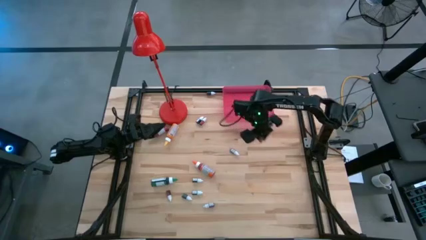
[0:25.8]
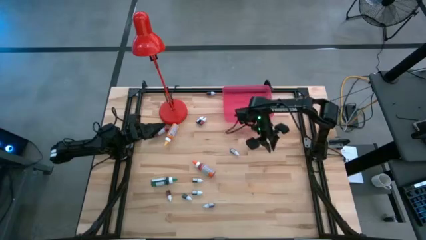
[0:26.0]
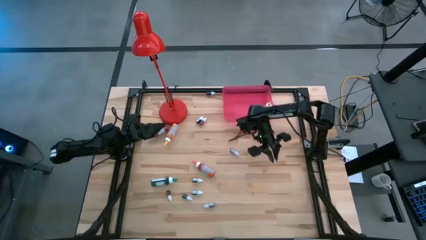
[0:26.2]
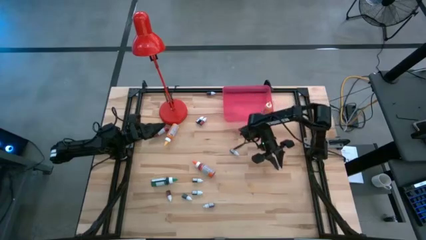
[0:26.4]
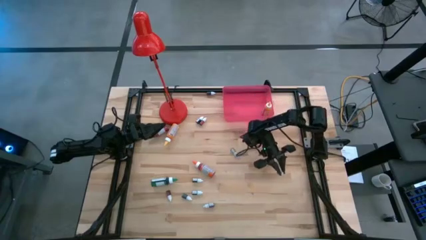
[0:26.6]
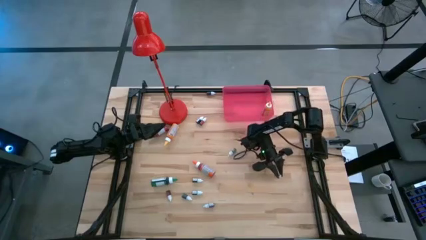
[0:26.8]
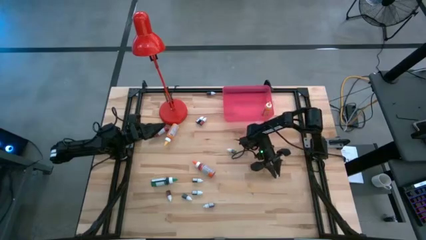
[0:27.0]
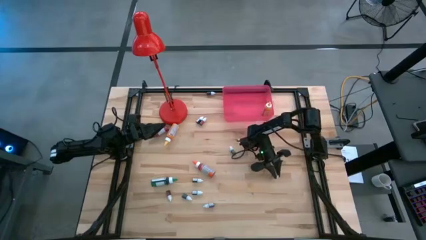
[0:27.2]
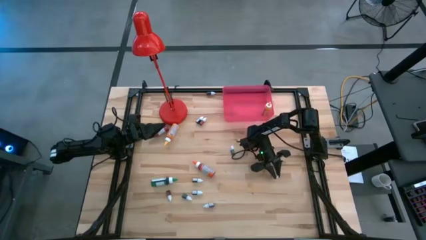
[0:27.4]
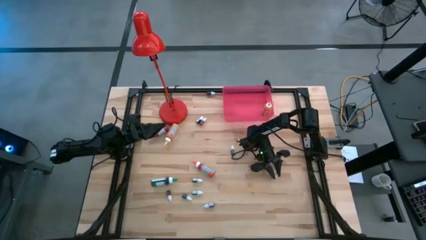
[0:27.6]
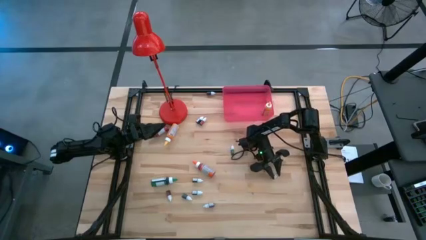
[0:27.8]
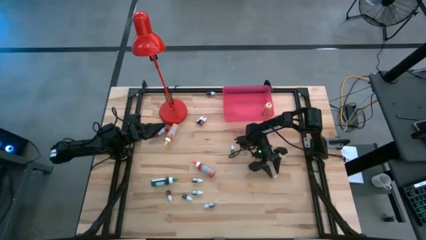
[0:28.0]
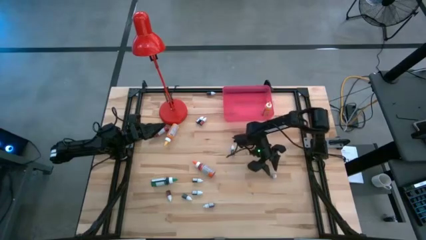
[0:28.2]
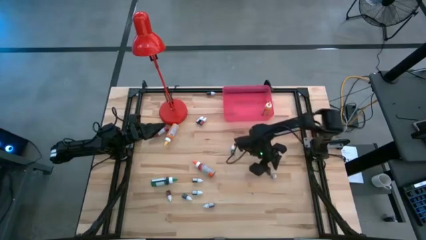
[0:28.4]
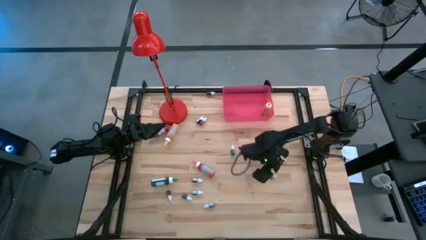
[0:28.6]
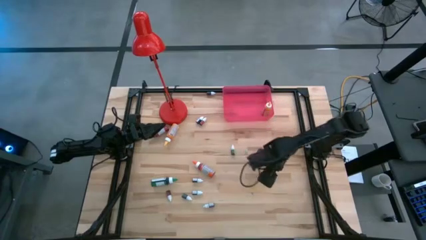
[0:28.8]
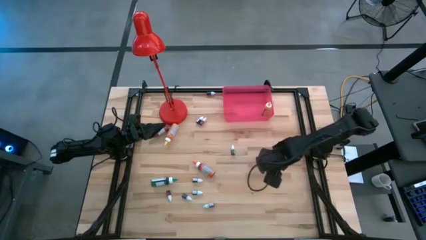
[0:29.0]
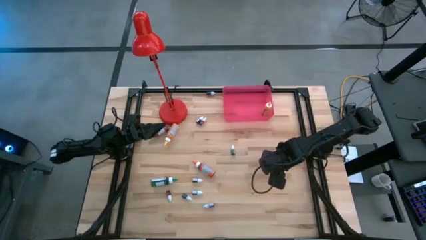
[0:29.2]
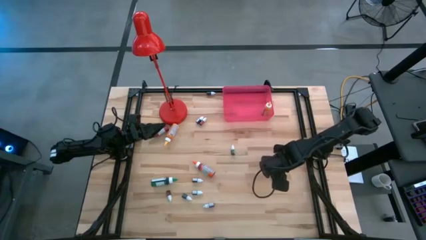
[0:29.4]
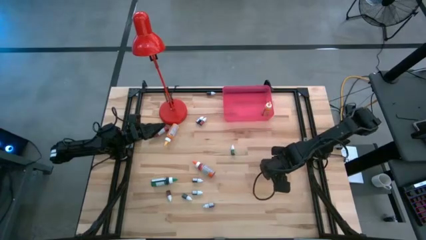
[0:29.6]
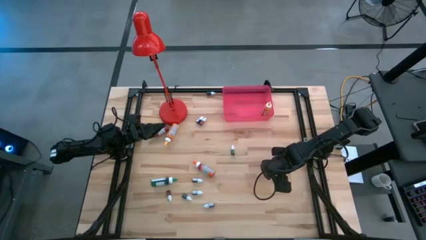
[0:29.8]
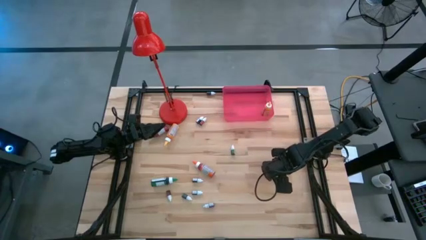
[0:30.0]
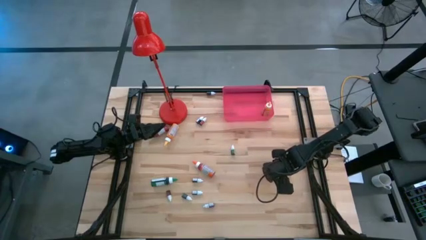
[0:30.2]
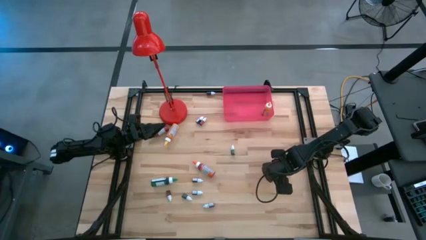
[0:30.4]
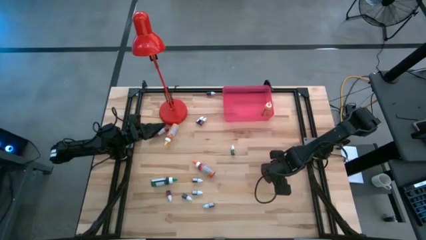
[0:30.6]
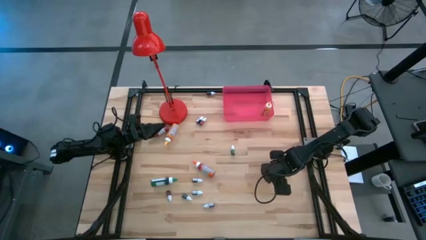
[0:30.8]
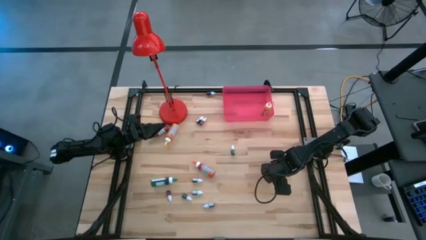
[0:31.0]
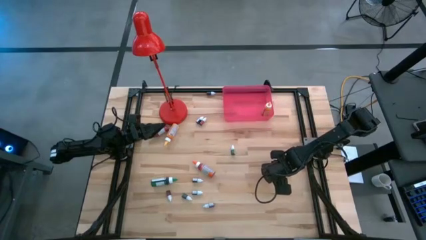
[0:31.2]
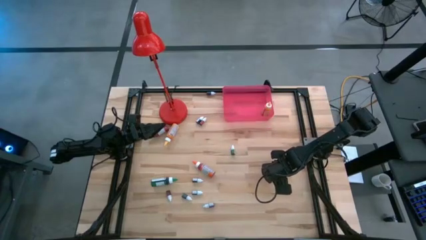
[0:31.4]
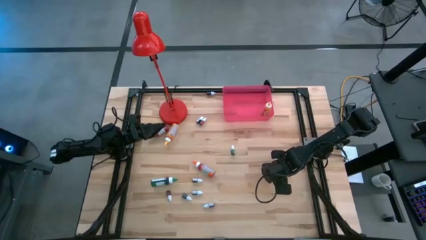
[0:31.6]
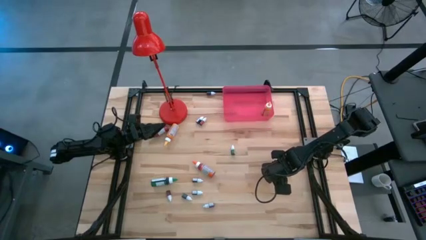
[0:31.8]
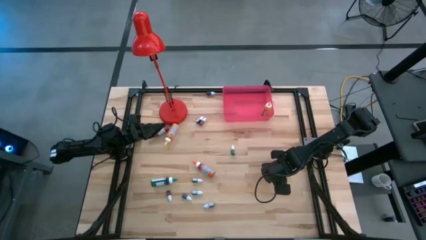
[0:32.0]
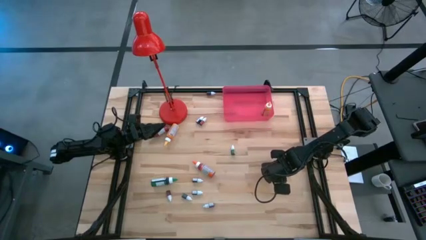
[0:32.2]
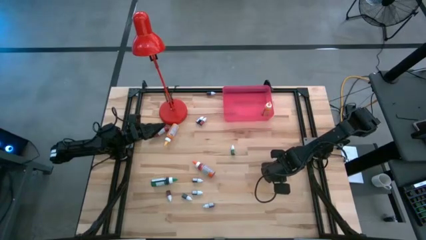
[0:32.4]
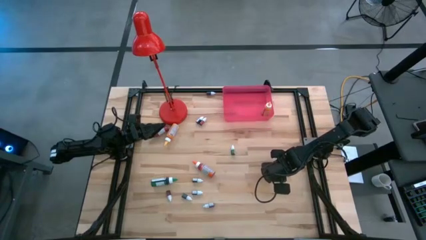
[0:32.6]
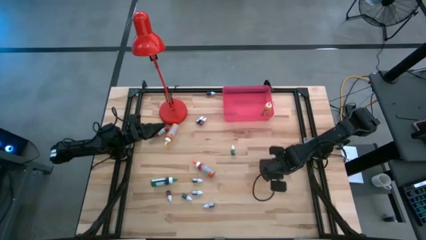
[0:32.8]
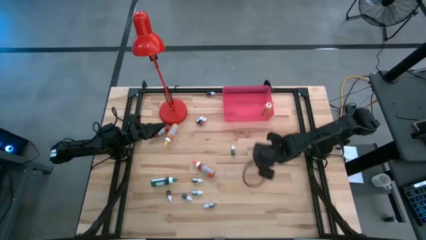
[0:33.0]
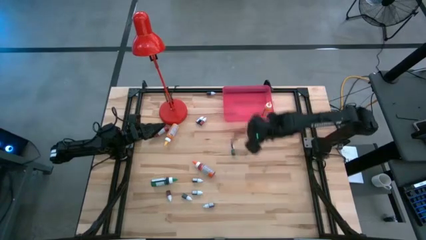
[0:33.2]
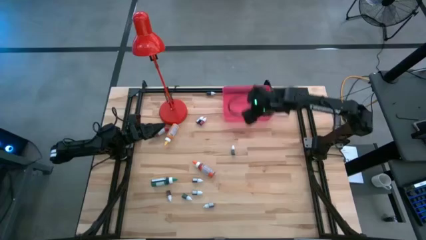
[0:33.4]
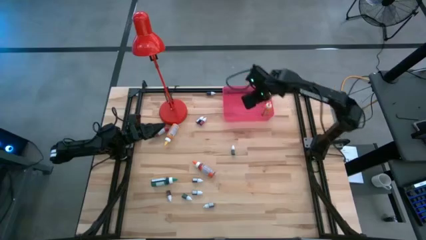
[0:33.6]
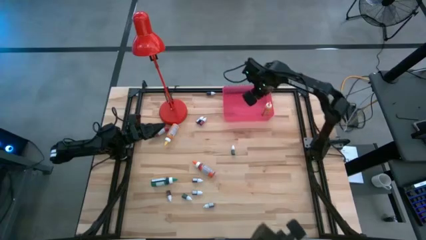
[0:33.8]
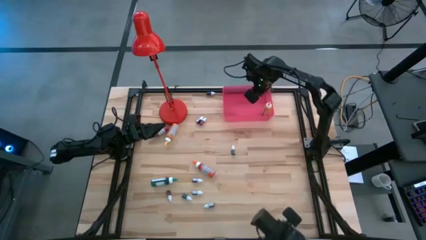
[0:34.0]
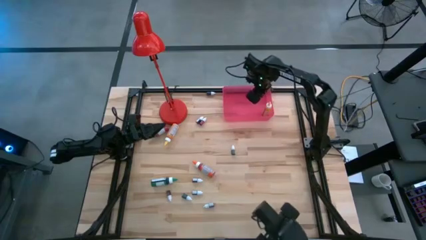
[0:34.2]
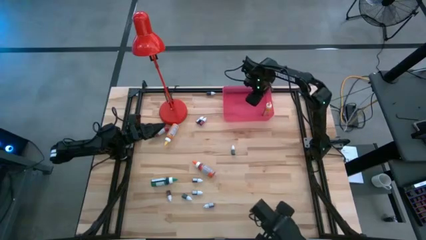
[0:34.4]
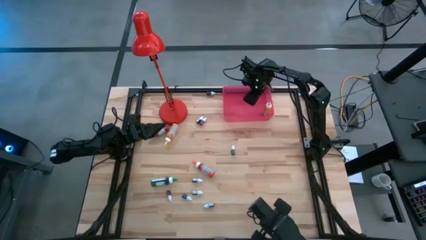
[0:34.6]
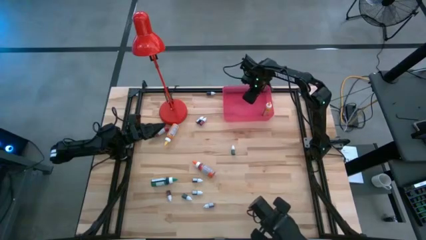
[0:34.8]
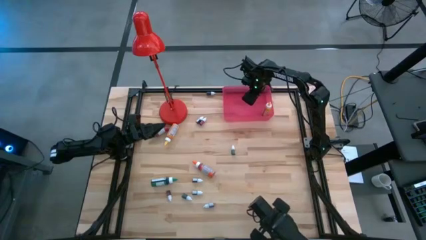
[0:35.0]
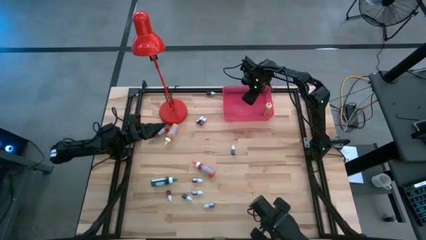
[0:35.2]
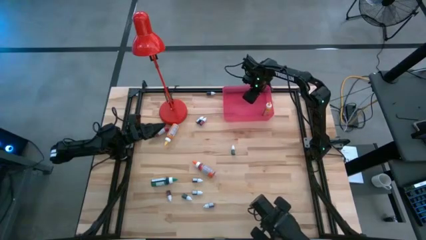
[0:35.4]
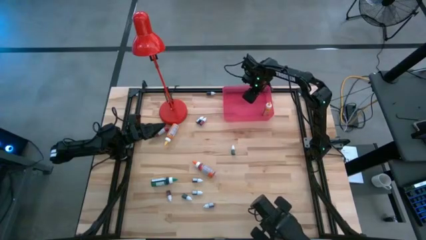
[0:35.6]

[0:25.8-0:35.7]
Task: Pick & Place food coloring
Put the small blue food coloring bottle into the red bin

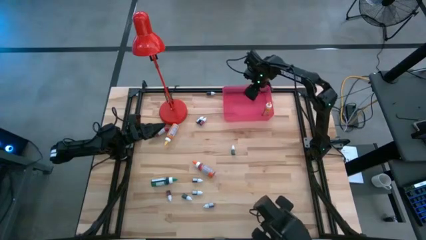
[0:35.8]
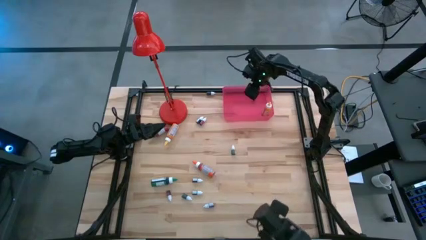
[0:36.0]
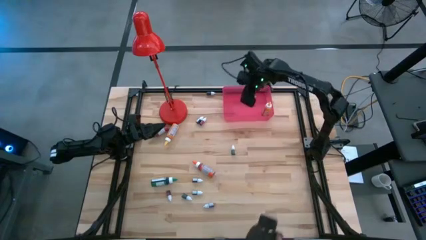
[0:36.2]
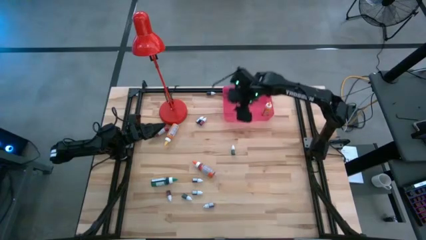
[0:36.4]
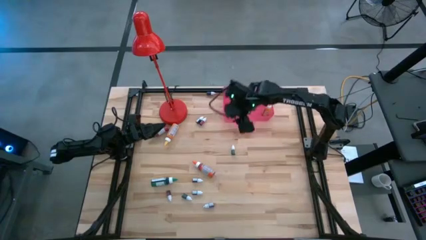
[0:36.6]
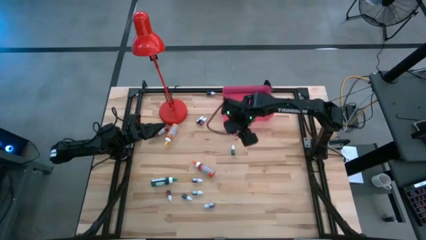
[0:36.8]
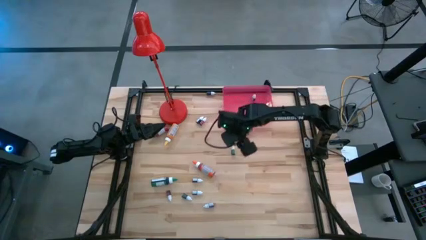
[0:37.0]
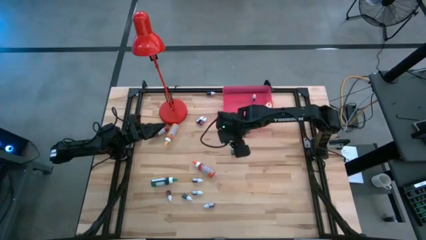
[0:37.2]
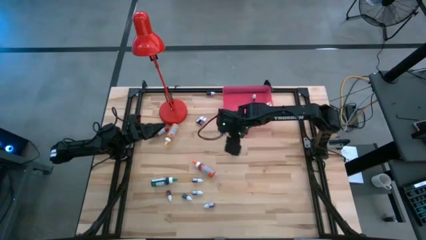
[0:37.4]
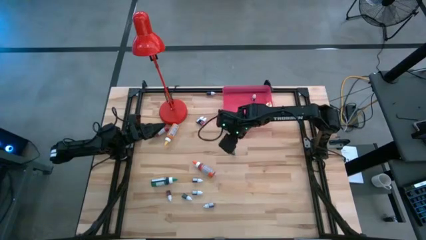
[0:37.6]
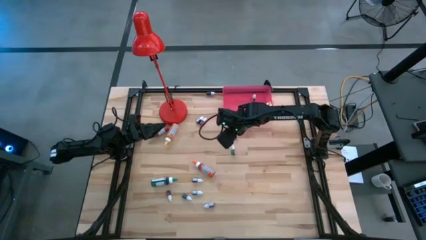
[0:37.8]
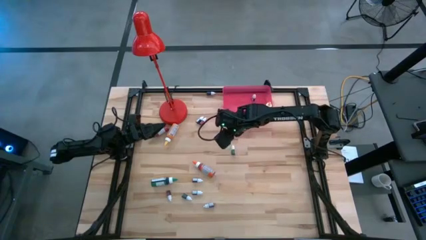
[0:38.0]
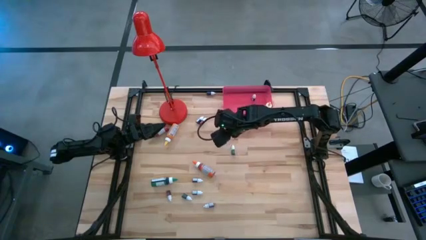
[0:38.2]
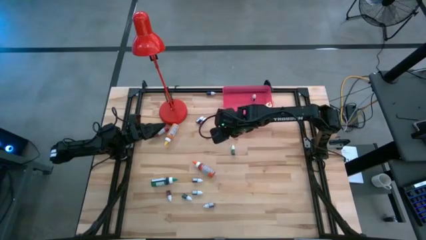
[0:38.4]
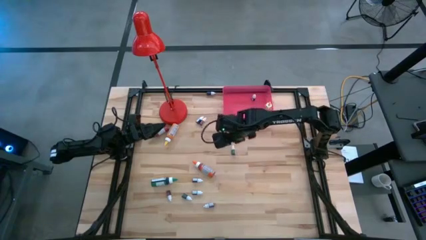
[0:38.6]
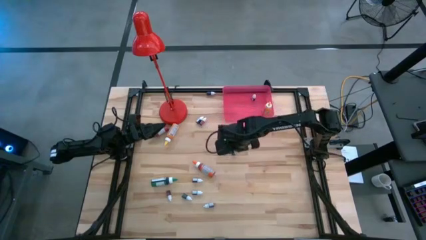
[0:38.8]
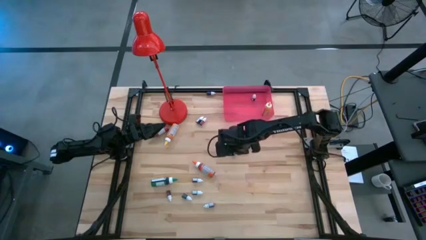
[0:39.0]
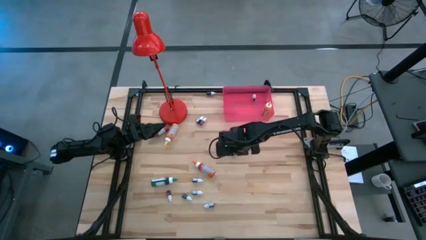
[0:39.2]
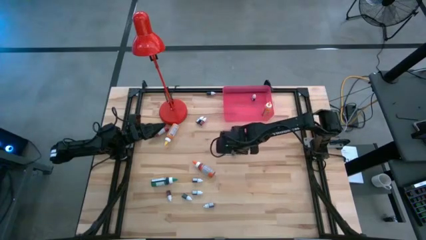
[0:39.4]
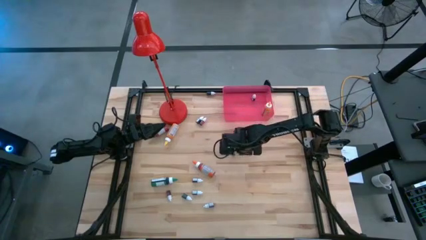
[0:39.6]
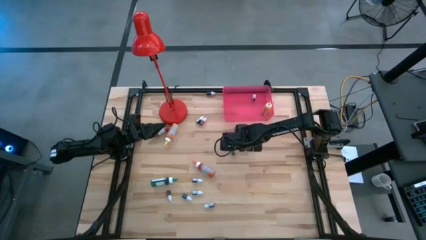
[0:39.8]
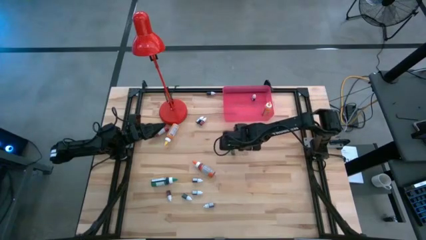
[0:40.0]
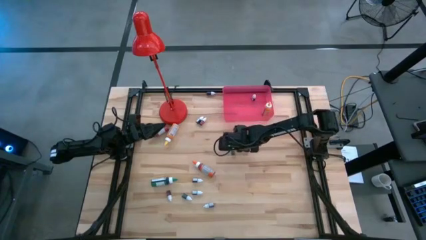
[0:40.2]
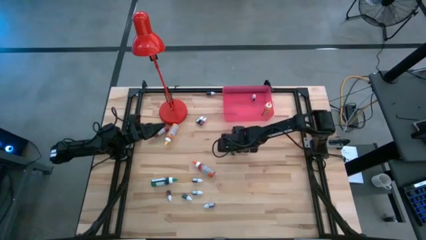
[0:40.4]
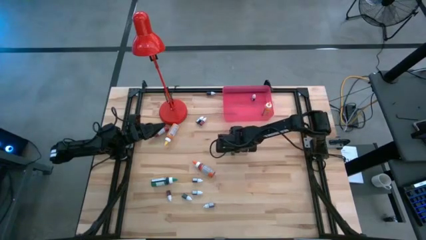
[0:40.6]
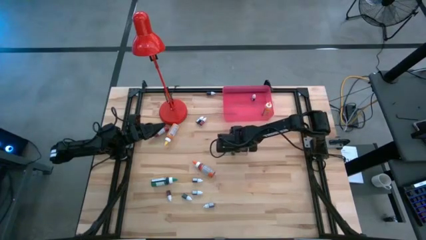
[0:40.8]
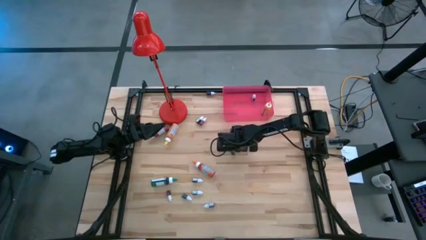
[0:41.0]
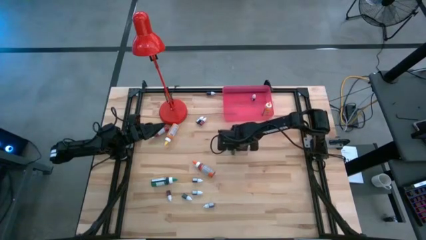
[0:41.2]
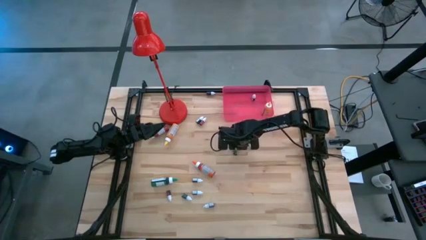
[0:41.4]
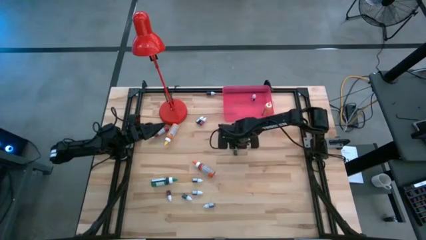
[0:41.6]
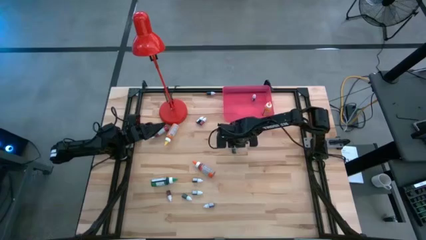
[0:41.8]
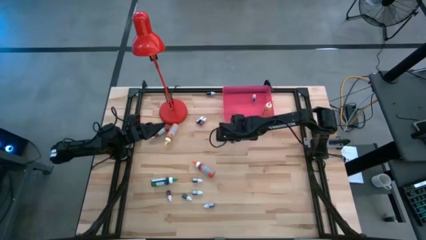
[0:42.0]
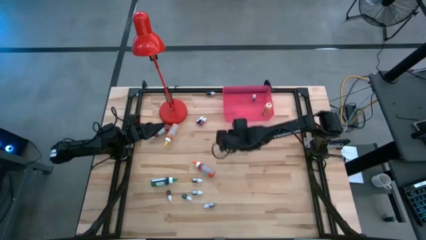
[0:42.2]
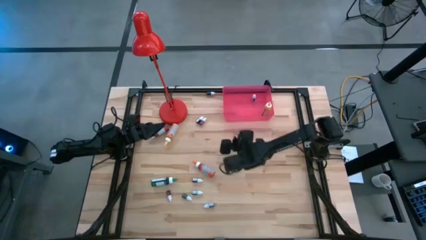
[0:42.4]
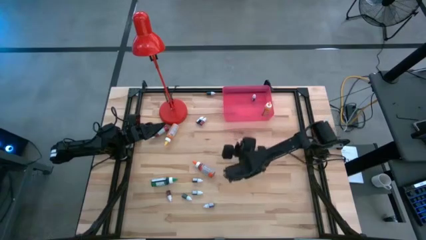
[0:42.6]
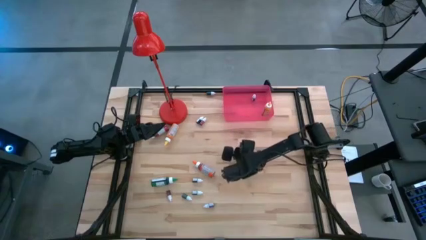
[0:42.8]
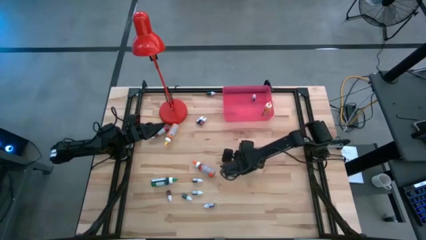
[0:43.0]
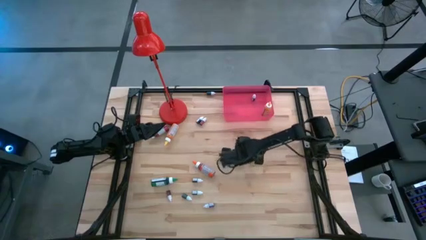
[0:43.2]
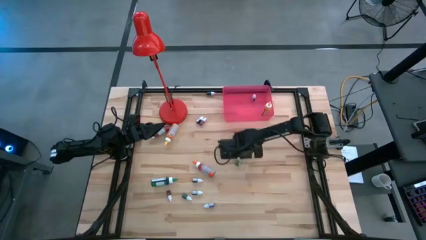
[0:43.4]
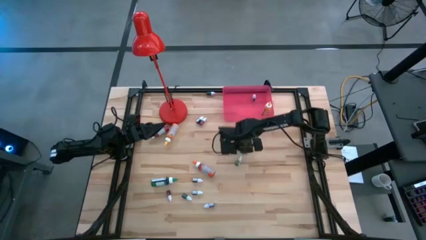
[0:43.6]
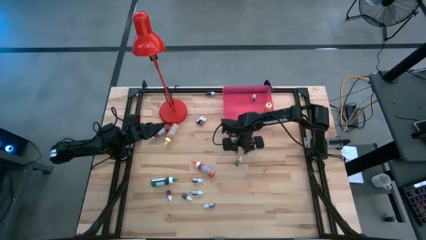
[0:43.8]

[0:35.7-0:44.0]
Put the small green food coloring bottle into the red bin
